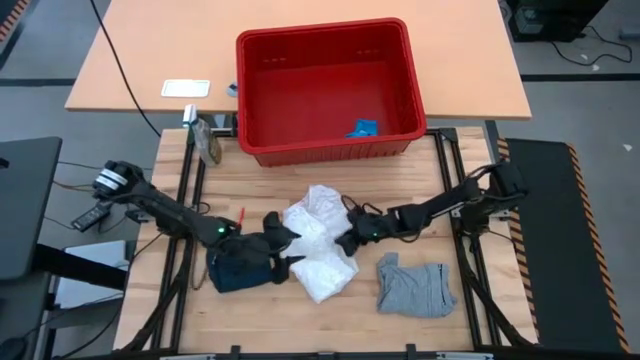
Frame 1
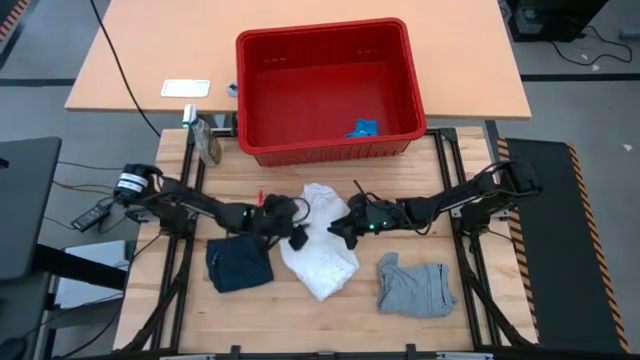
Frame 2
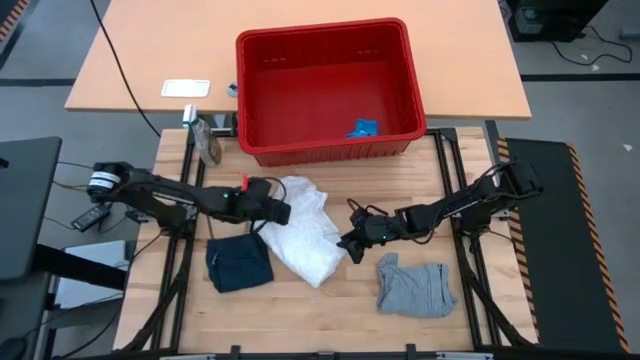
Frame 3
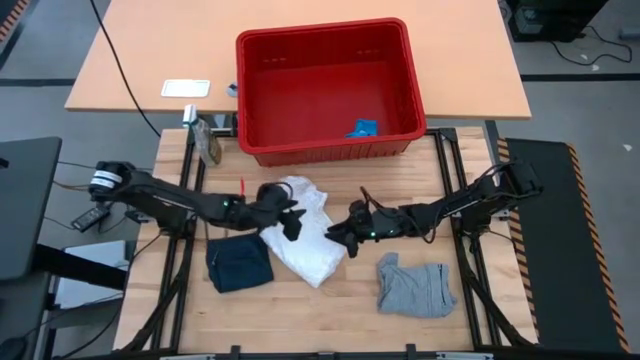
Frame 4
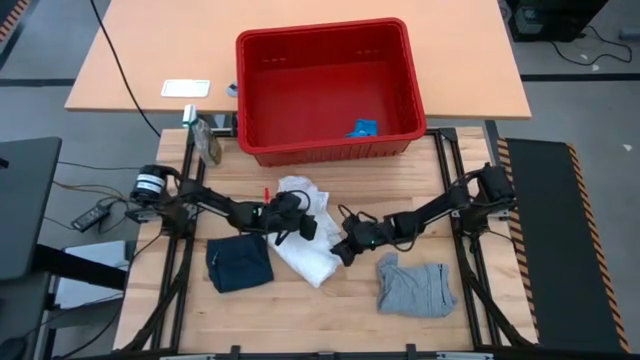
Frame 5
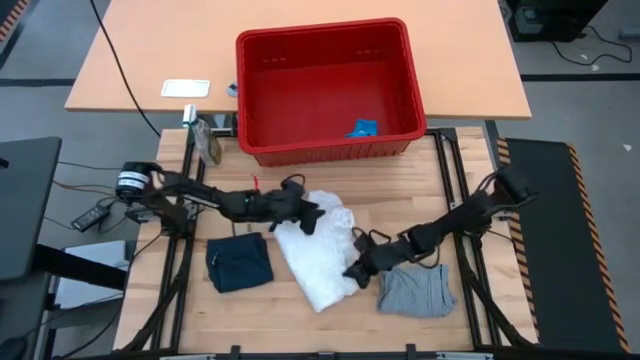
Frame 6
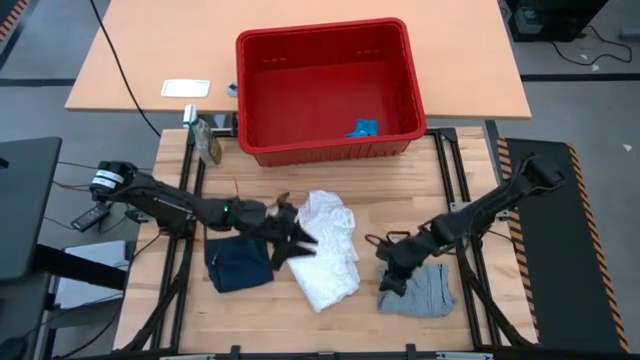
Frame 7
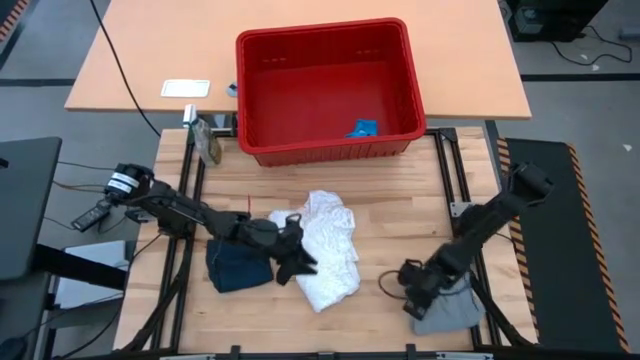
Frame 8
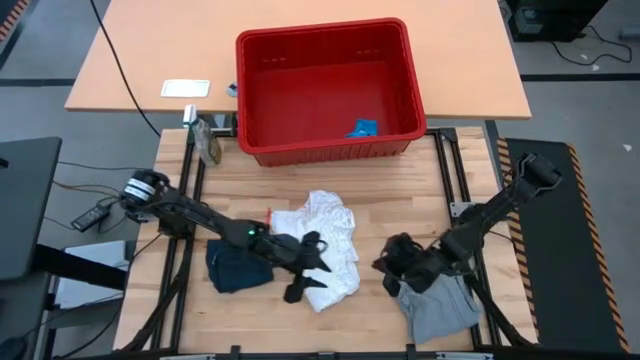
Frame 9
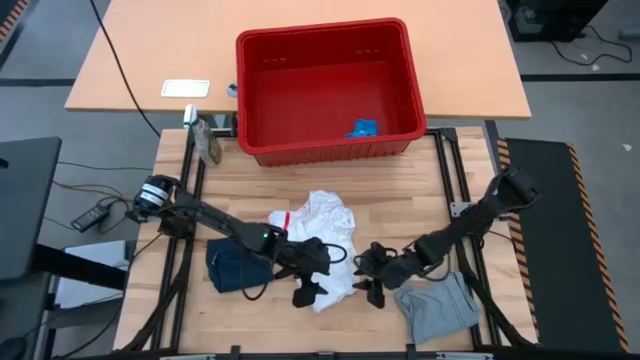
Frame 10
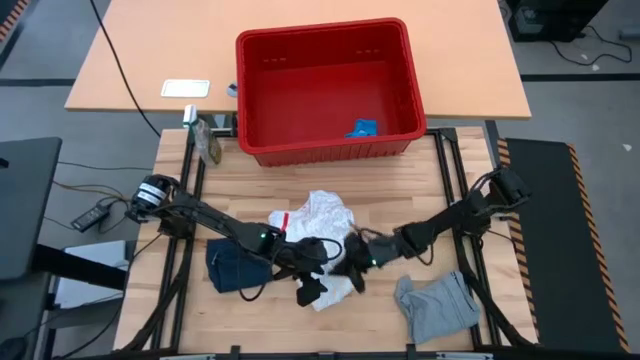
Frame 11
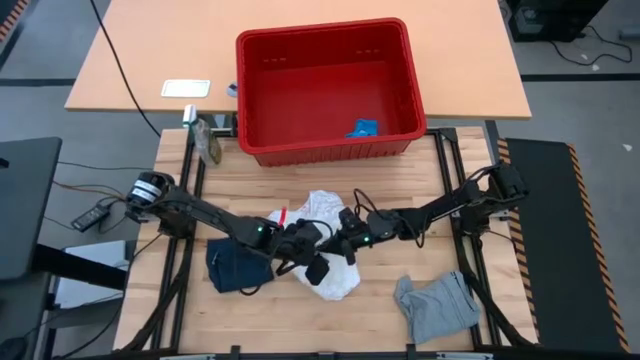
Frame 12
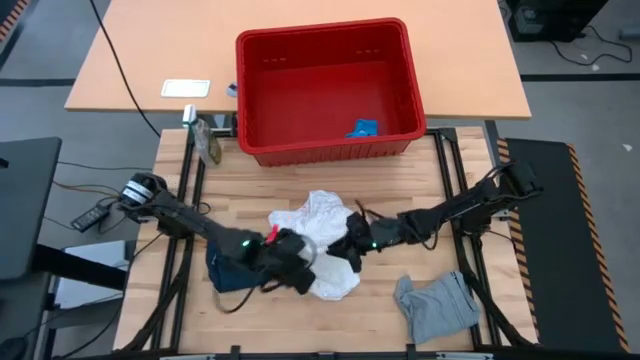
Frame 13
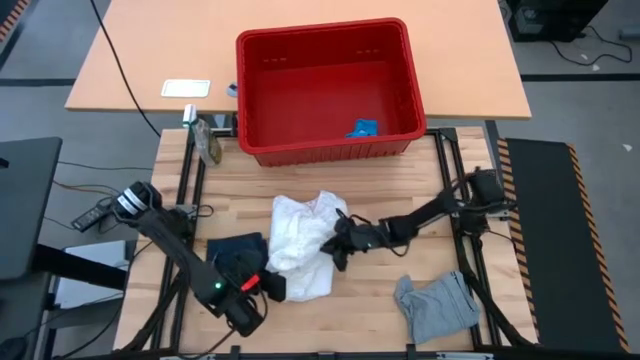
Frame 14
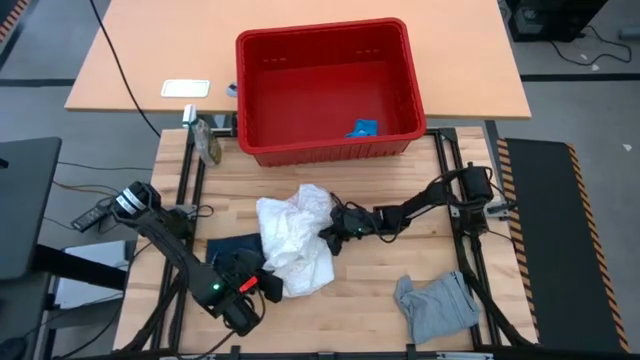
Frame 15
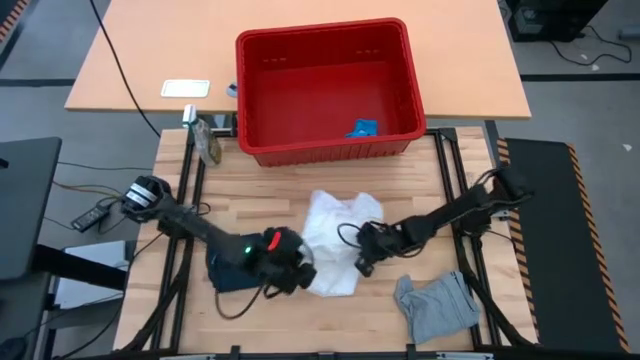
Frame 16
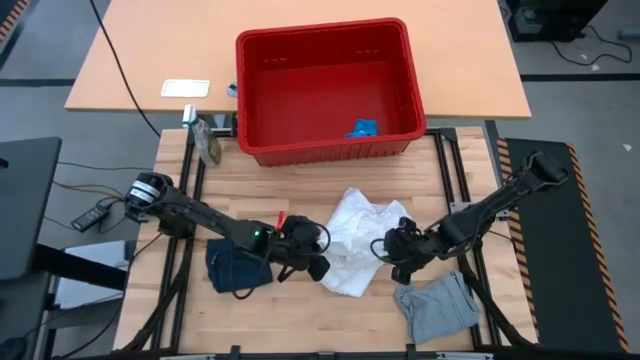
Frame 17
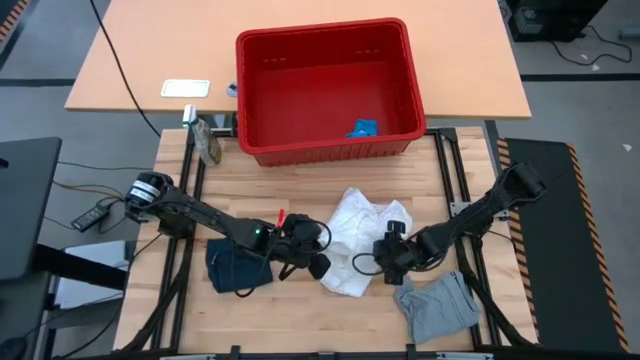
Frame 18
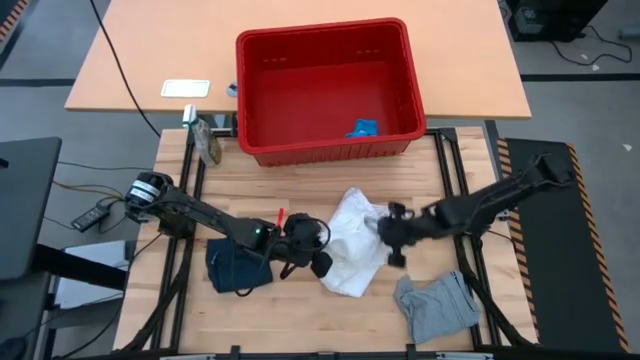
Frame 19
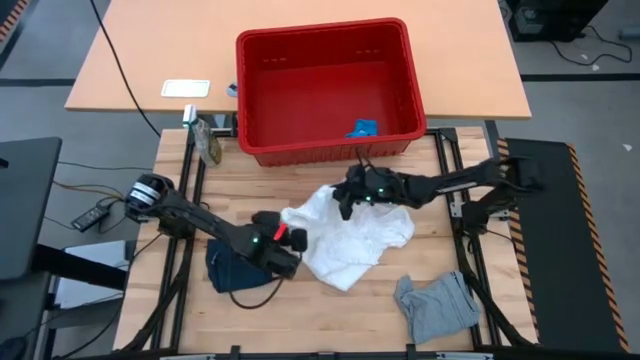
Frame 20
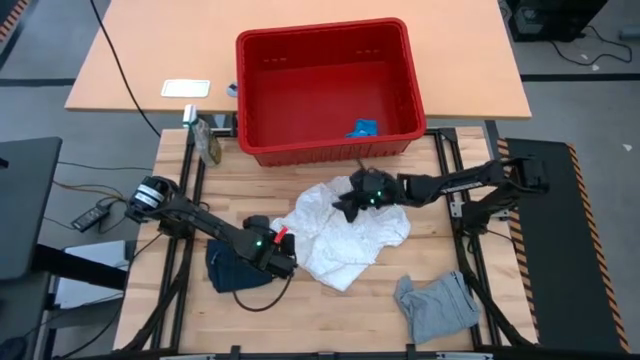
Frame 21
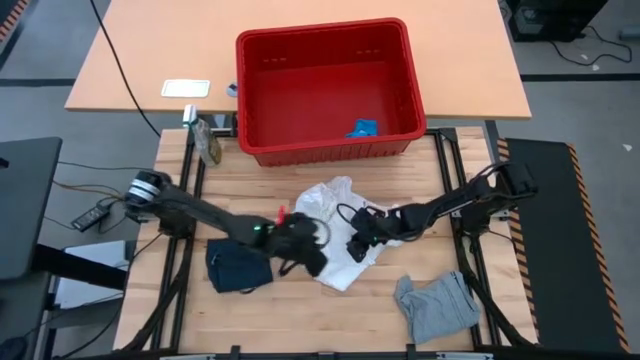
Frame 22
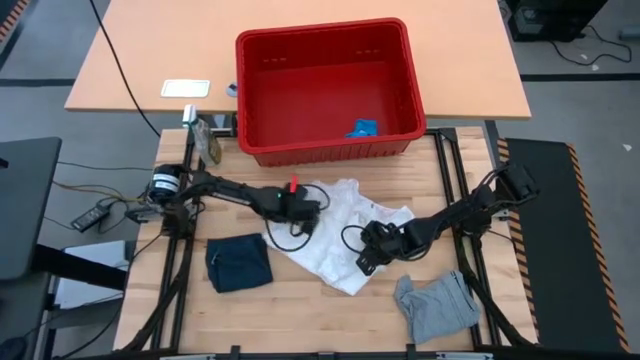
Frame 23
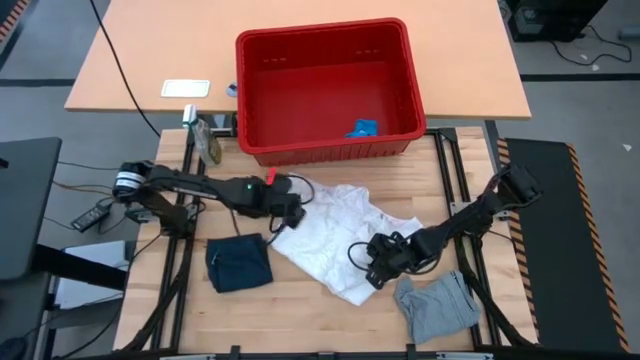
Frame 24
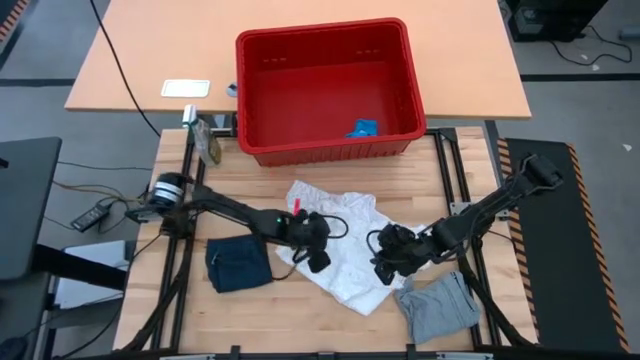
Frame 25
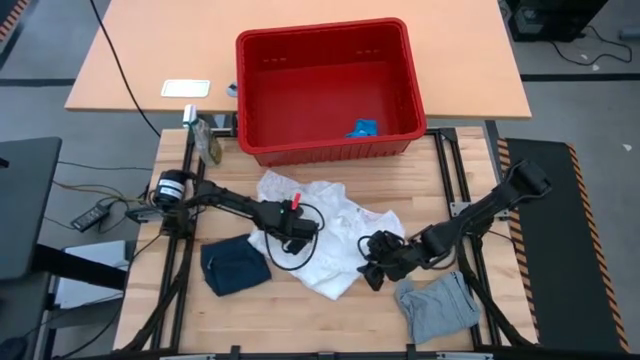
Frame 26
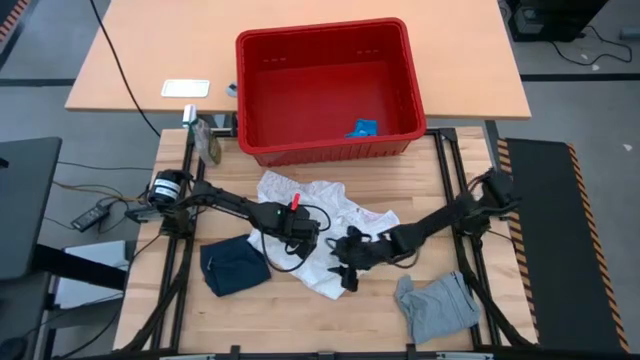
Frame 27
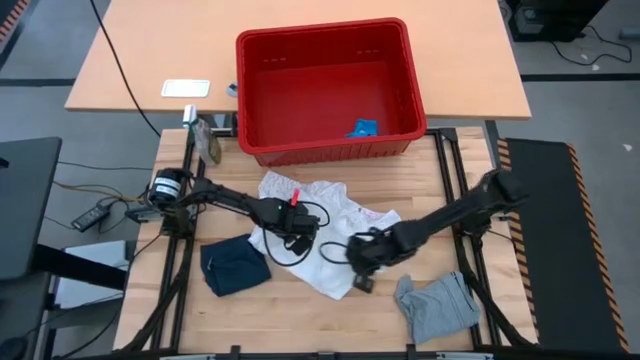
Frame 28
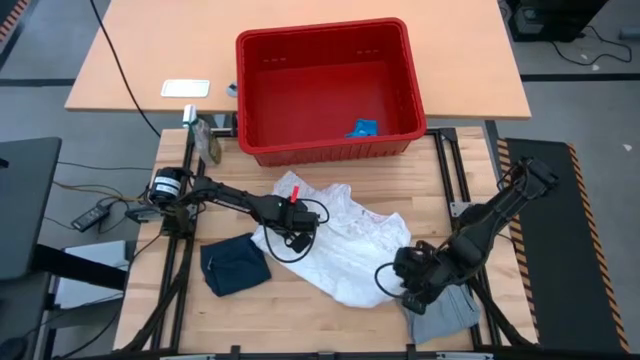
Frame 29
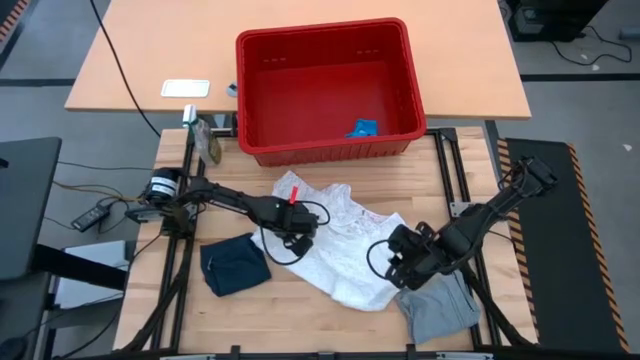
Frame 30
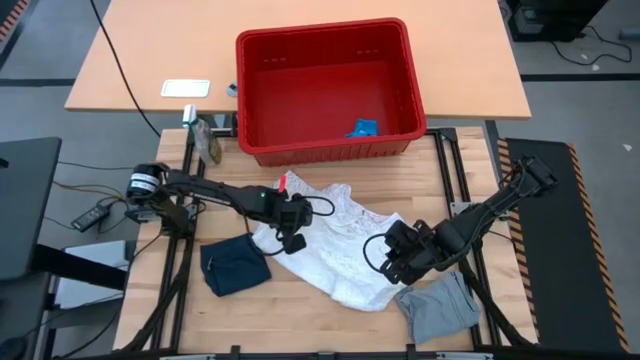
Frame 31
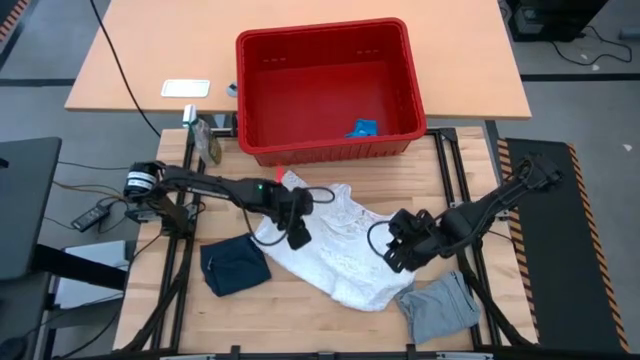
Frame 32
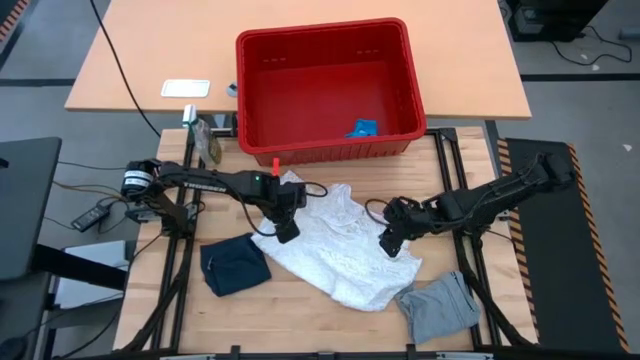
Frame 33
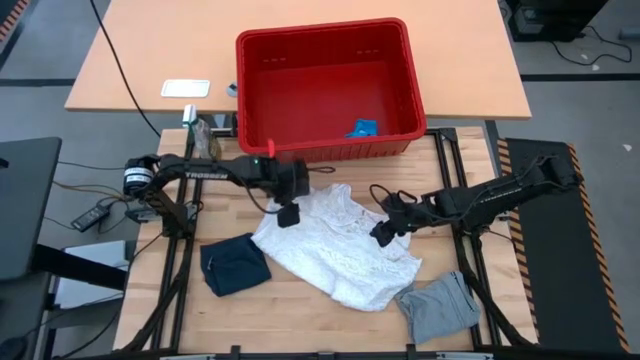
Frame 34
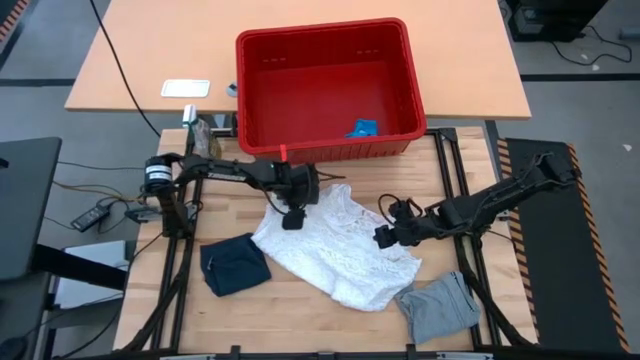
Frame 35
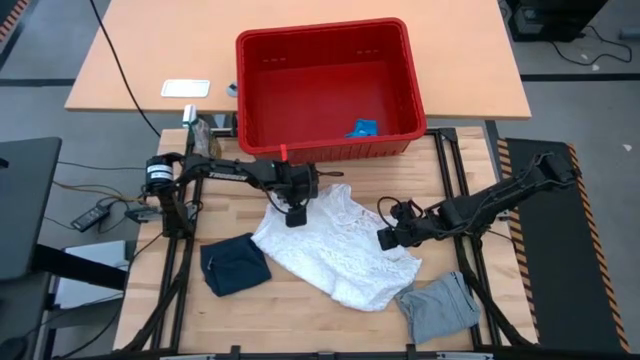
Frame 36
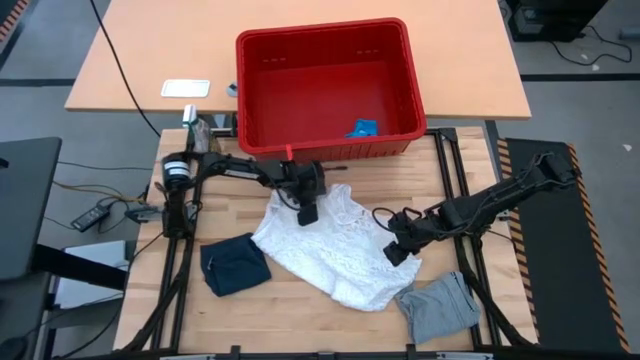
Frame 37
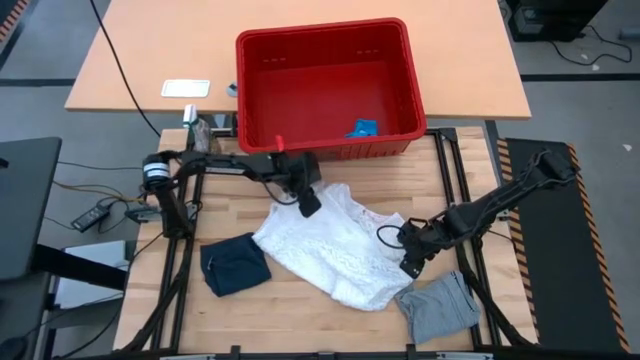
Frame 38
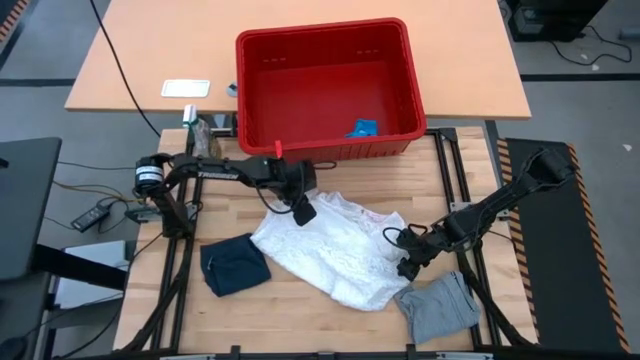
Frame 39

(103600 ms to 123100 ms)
Task: Fold laundry
Fold the white dress

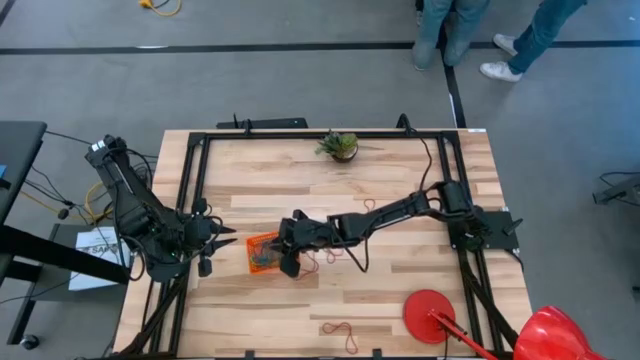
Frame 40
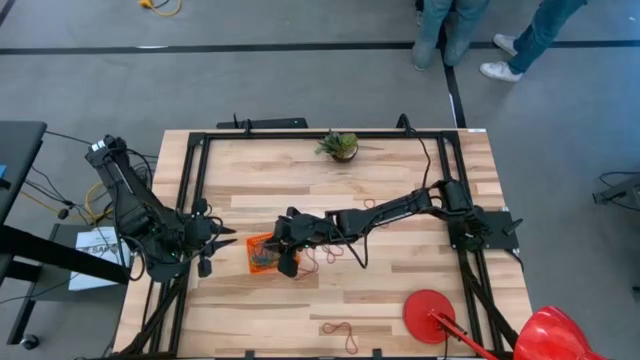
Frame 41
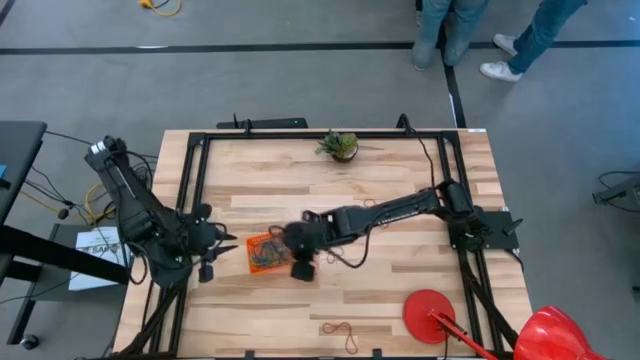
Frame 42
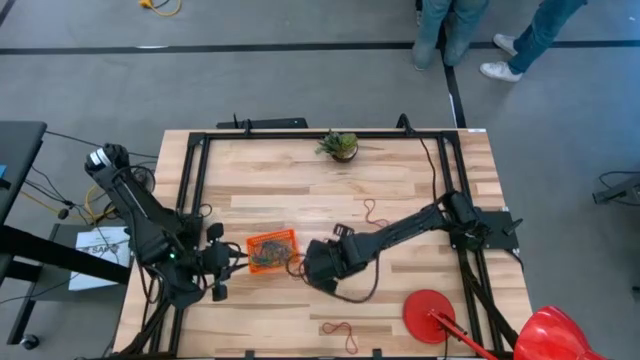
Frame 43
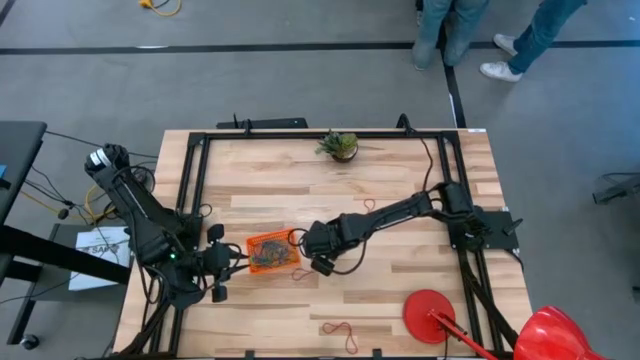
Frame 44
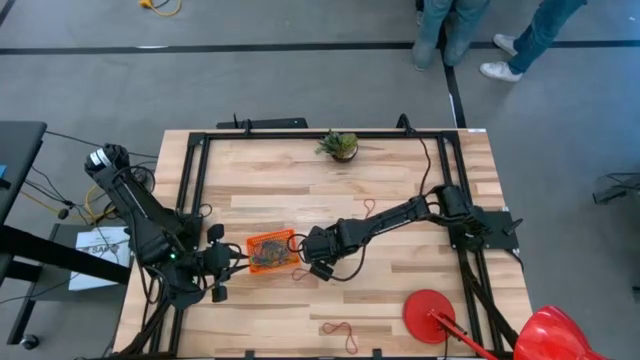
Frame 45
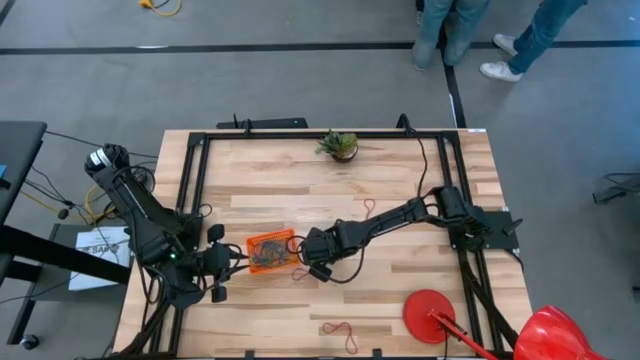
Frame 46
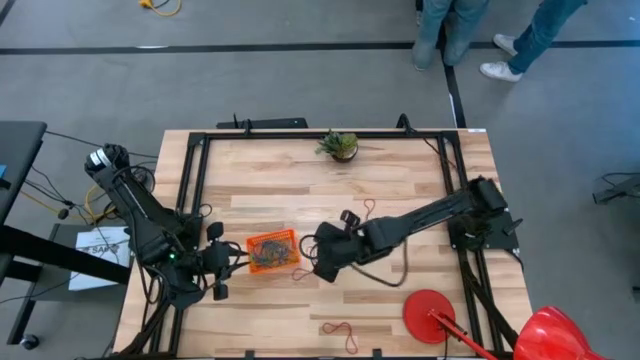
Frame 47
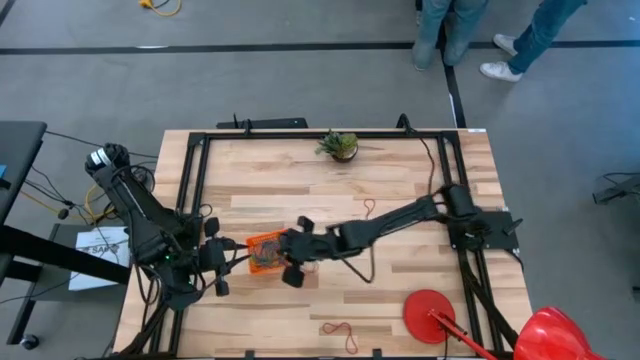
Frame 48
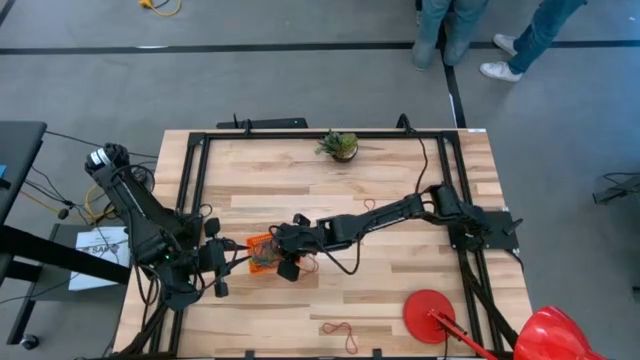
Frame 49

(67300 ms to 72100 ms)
Task: Pick and place rubber bands into bin
Put the red rubber band into the orange container
